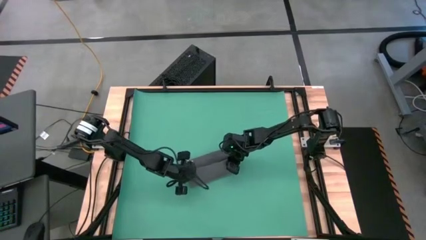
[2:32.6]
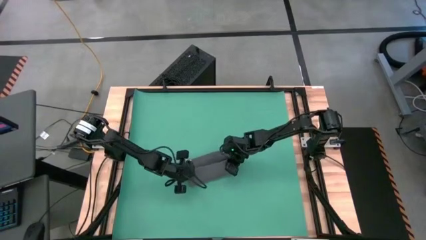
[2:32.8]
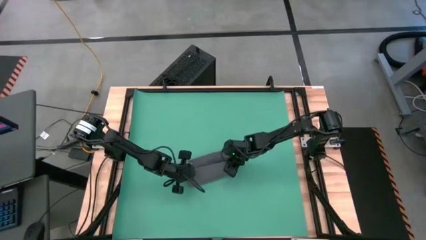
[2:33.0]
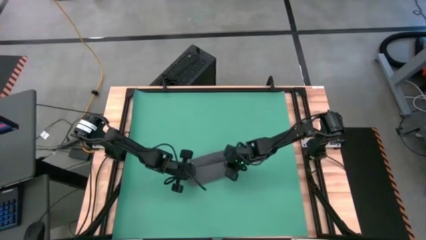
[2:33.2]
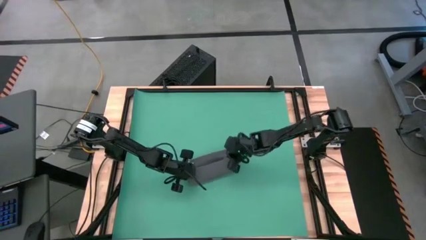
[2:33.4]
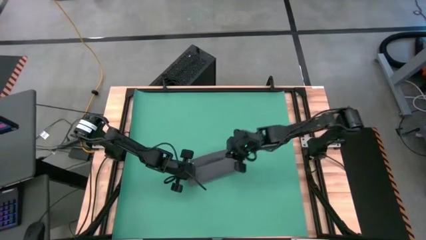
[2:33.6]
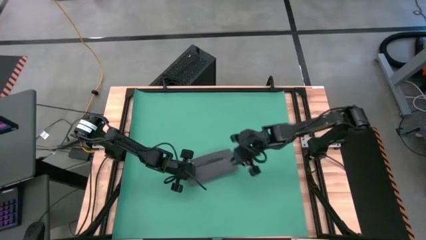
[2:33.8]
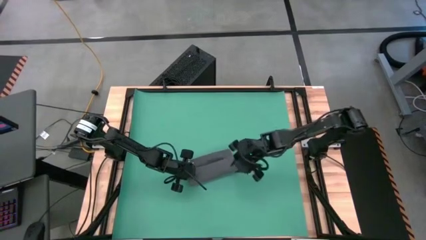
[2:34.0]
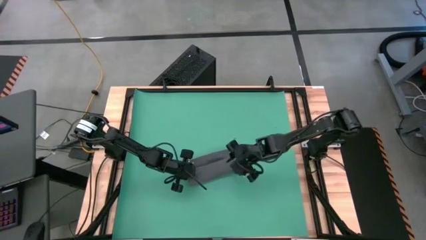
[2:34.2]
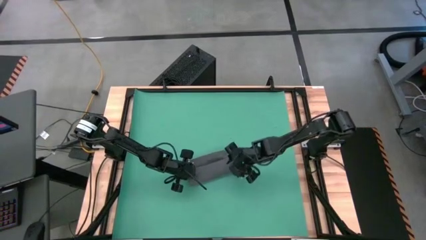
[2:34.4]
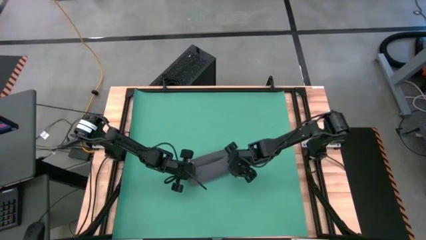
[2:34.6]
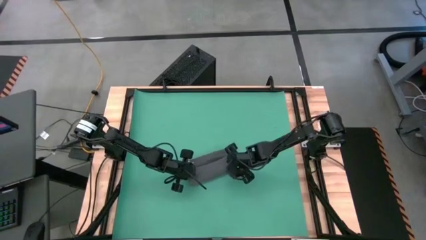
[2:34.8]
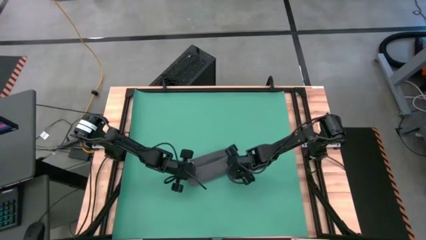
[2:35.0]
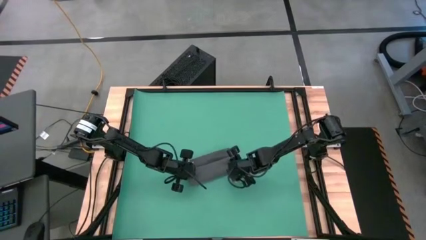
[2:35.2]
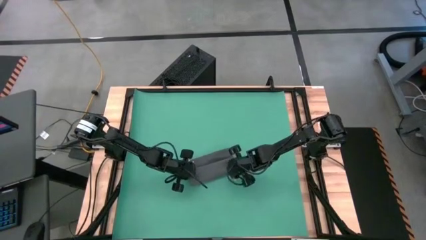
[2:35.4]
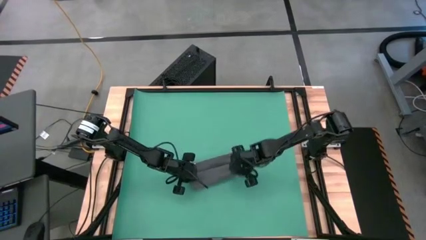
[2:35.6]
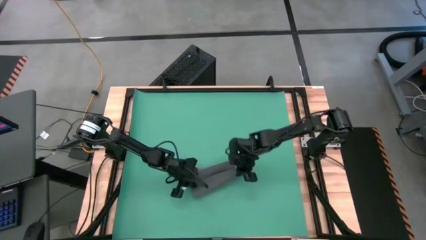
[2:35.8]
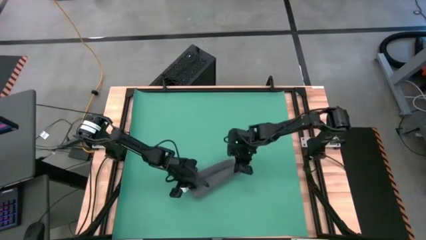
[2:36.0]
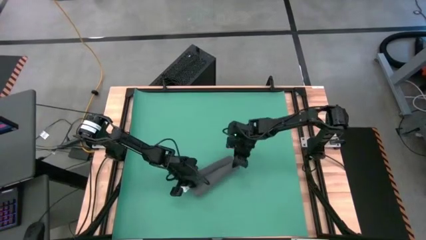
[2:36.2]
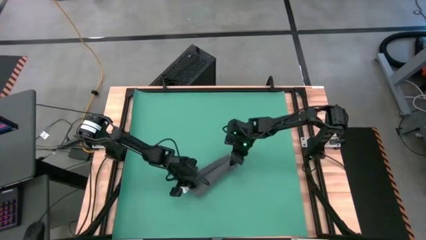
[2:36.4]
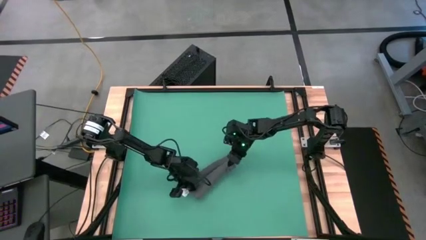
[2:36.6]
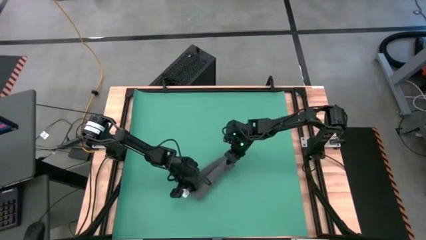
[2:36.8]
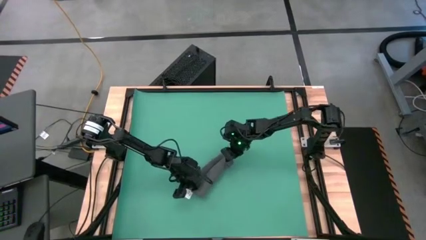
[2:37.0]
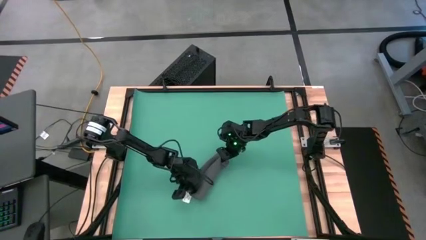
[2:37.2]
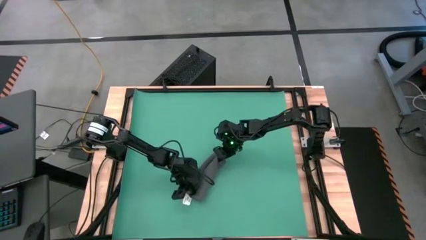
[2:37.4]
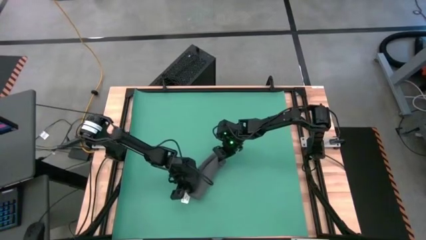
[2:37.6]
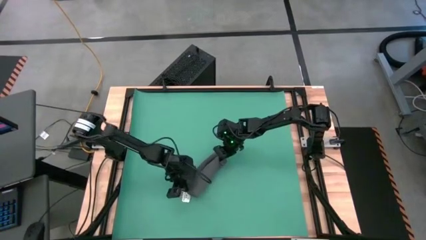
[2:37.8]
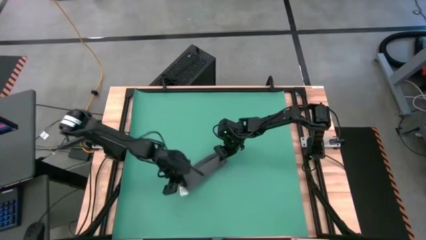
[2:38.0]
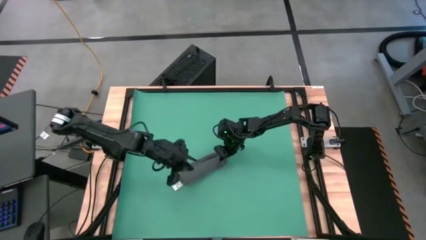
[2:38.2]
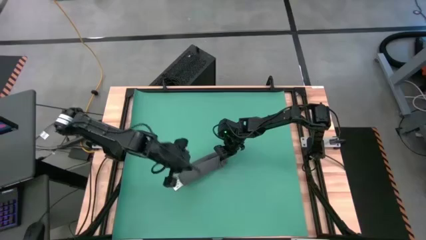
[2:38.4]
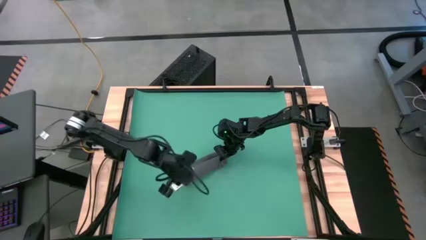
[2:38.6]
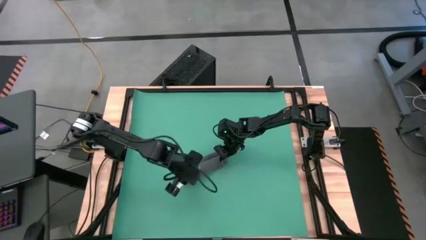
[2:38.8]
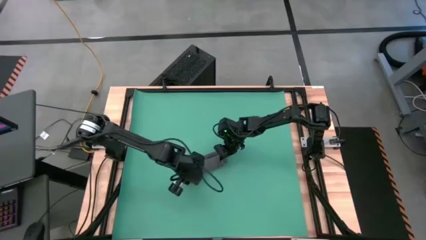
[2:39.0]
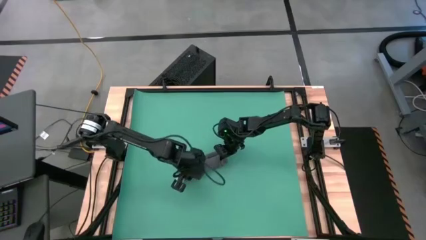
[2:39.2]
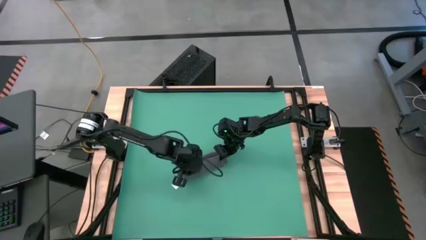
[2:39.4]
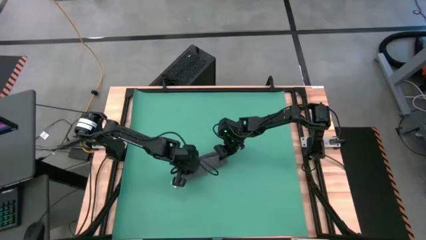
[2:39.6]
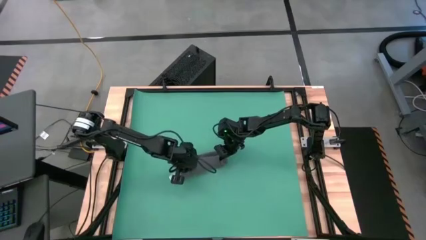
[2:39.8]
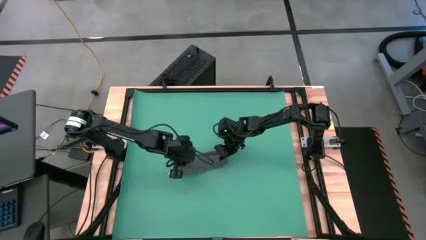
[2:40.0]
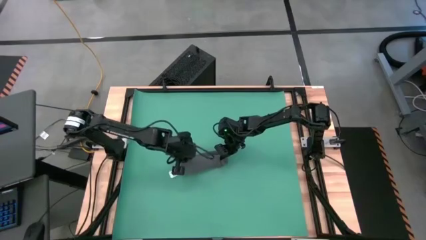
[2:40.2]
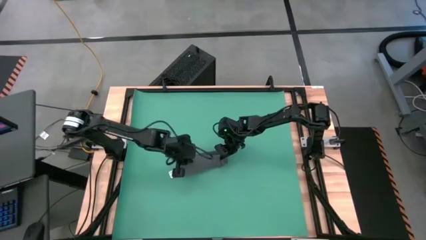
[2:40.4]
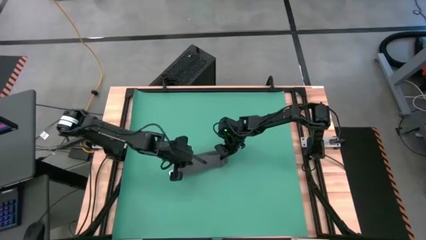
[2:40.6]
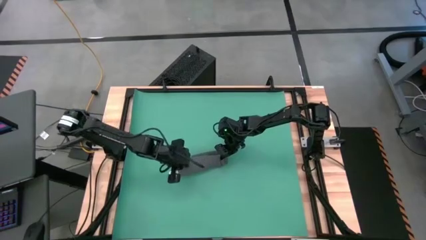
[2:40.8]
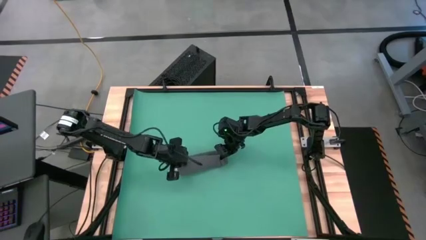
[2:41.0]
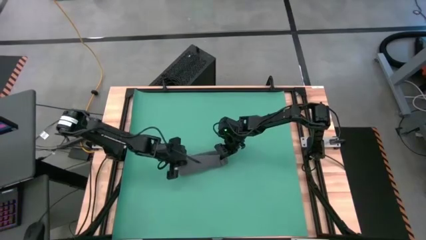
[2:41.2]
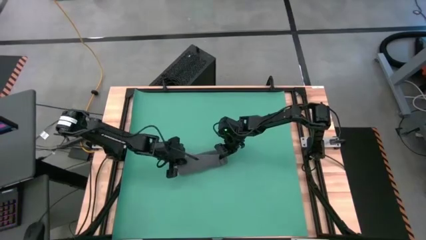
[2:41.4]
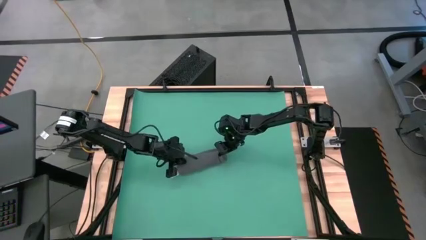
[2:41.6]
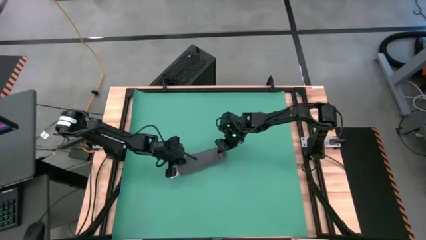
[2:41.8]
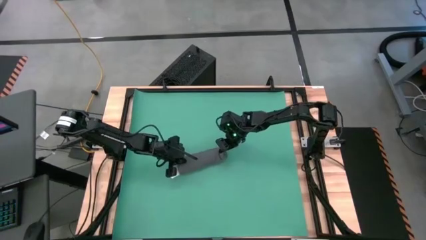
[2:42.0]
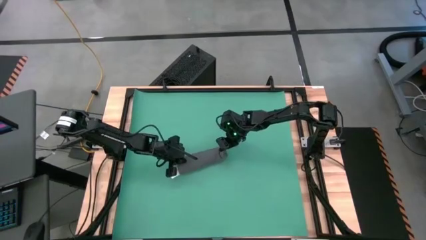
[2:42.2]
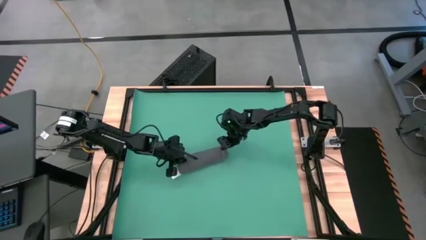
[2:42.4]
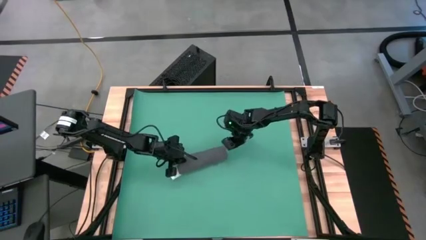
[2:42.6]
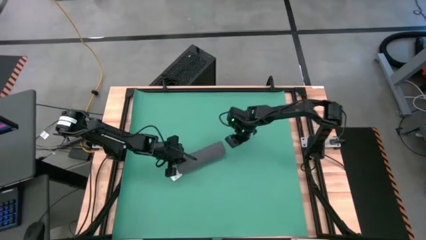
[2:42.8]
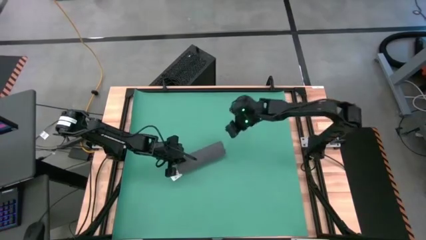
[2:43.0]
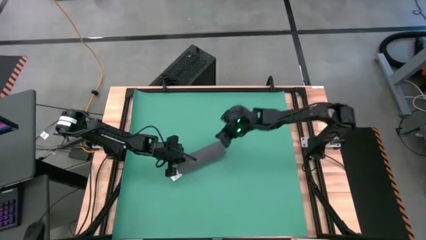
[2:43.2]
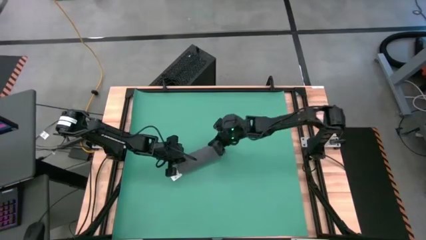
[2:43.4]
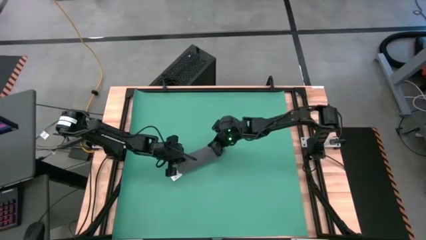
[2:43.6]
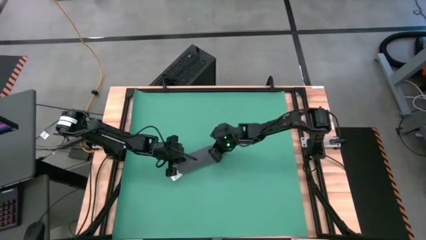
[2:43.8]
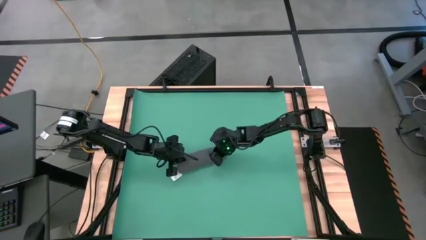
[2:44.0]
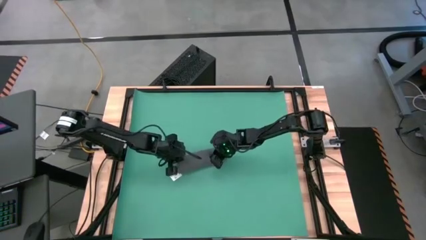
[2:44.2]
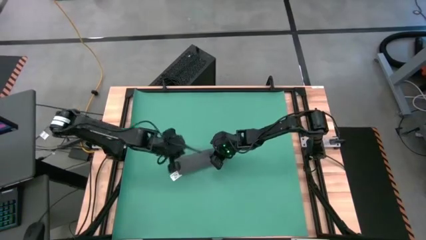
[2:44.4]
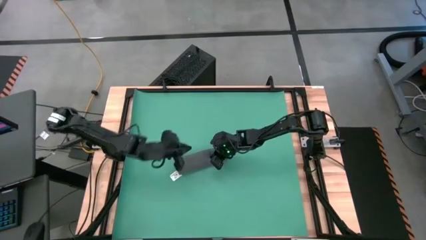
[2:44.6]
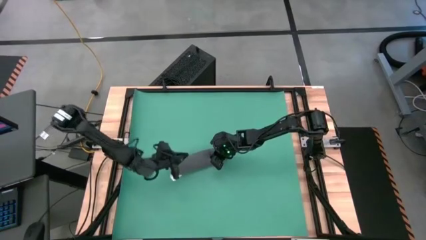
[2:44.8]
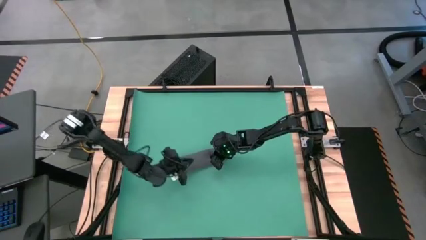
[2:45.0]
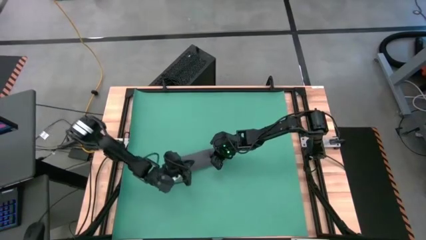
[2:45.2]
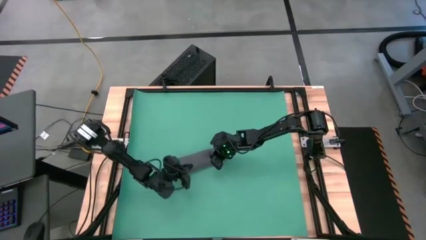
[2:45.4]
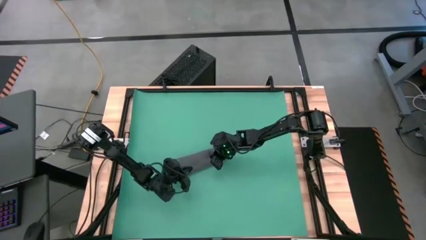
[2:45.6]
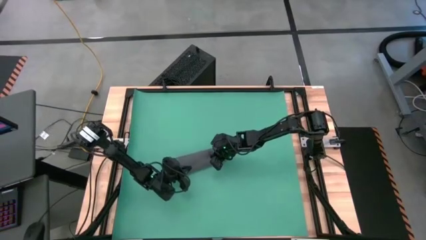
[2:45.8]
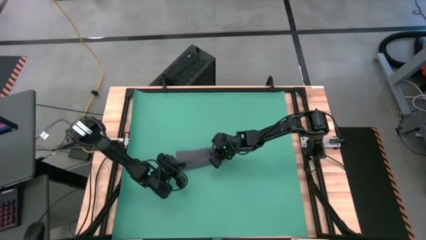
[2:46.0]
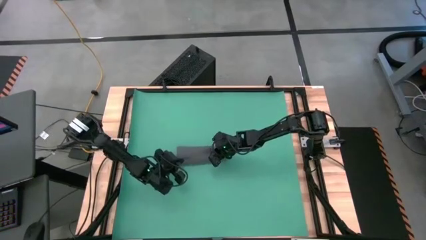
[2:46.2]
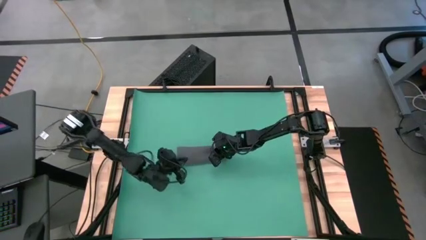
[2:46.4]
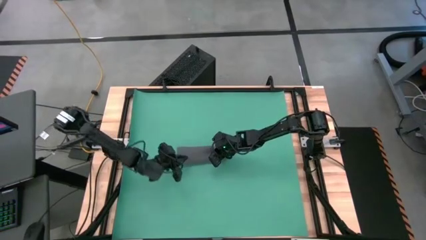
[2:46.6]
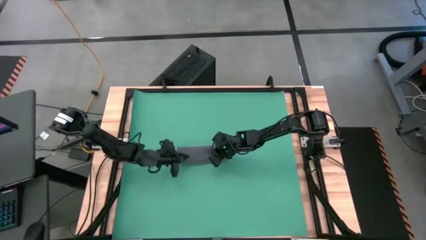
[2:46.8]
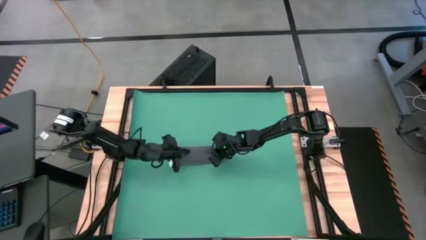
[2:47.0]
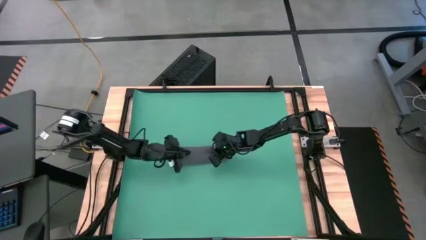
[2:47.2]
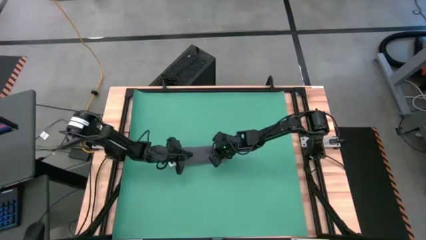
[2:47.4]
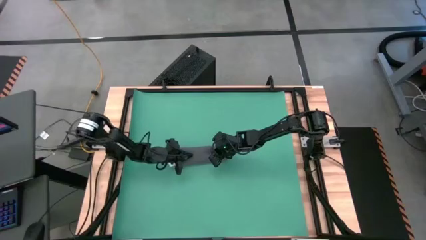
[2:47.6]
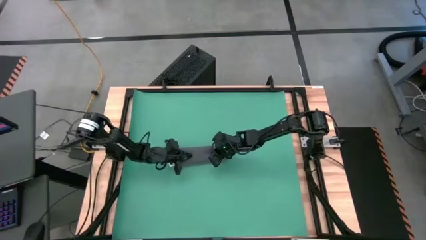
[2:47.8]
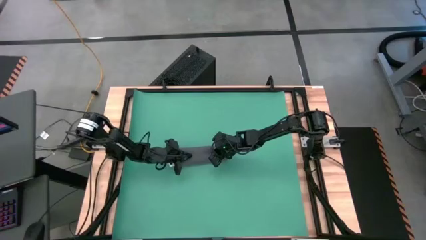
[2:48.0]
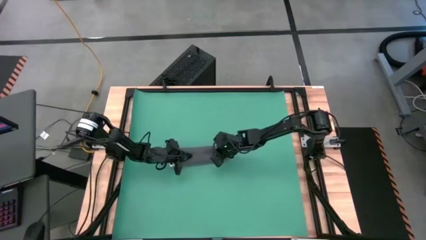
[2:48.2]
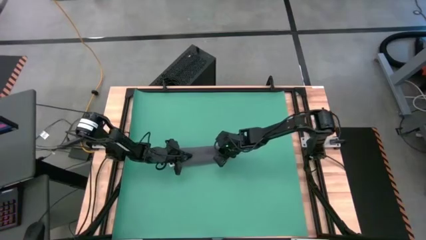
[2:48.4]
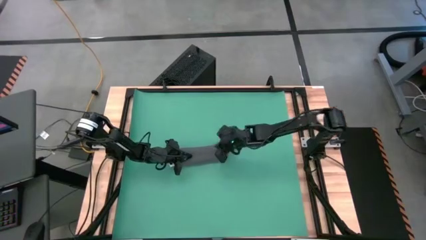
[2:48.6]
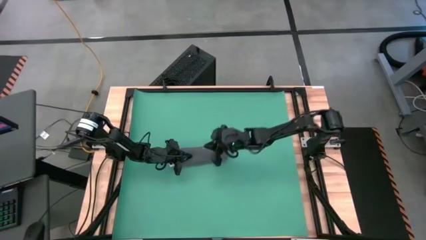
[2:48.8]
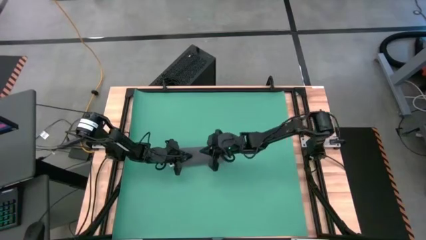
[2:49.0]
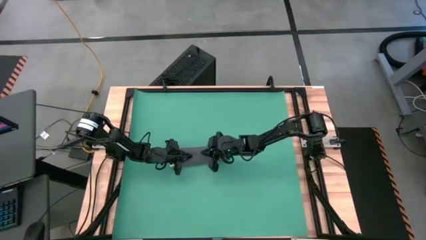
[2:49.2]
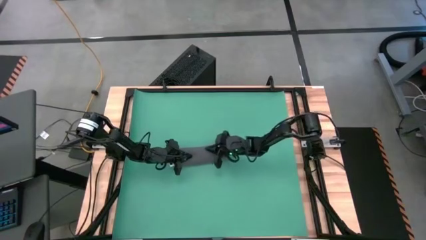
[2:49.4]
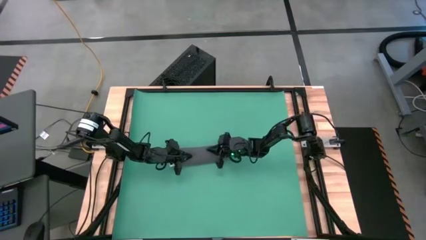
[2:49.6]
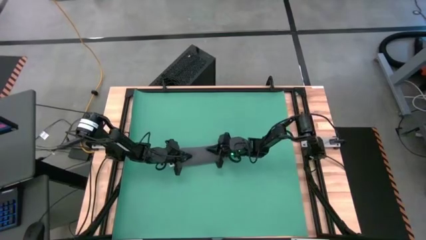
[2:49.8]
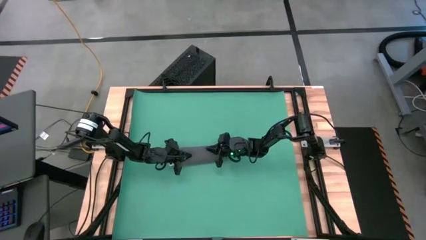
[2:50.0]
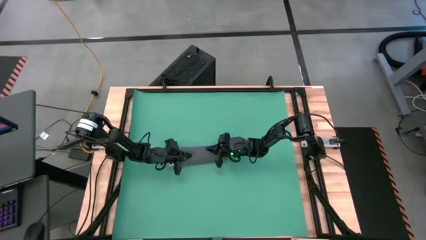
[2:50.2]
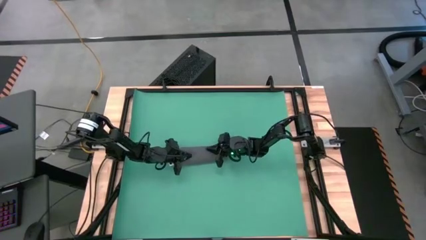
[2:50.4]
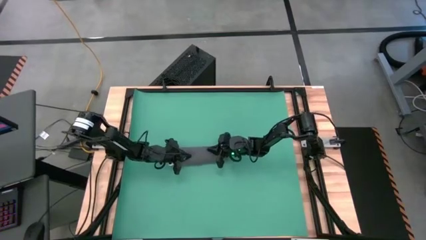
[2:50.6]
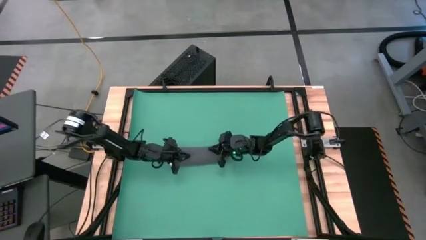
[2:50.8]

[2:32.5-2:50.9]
Task: Roll towel
Roll the gray towel
